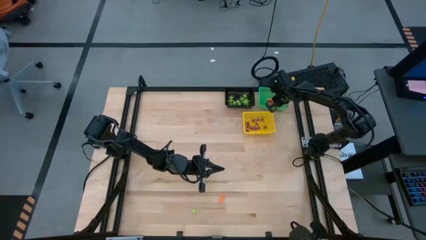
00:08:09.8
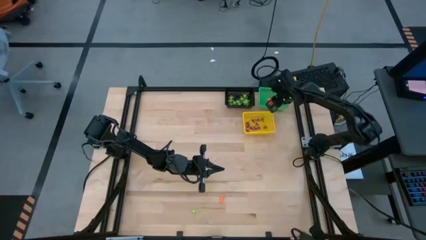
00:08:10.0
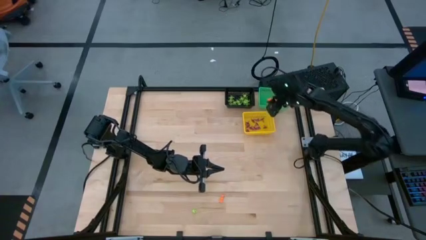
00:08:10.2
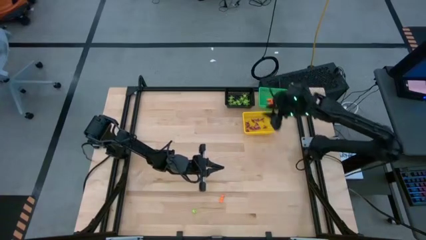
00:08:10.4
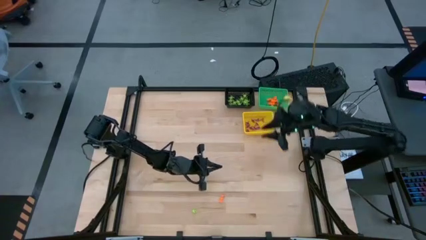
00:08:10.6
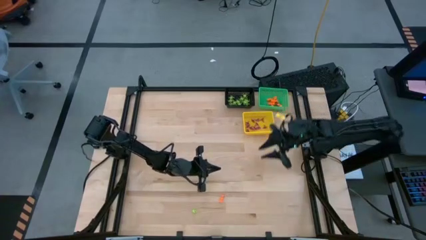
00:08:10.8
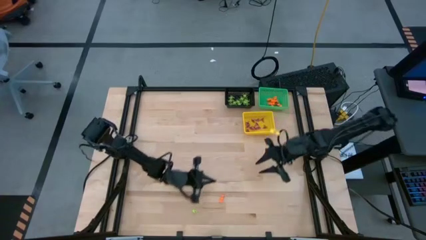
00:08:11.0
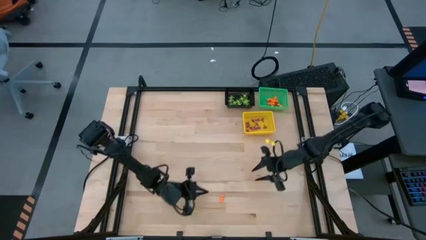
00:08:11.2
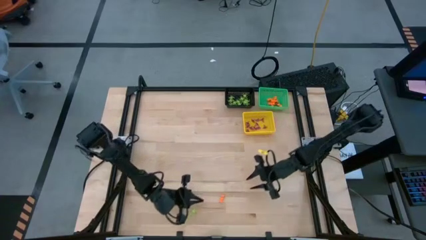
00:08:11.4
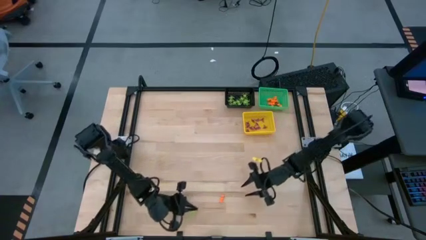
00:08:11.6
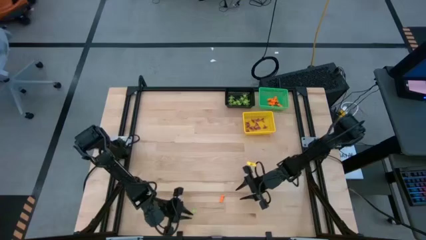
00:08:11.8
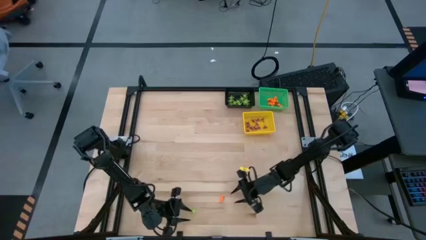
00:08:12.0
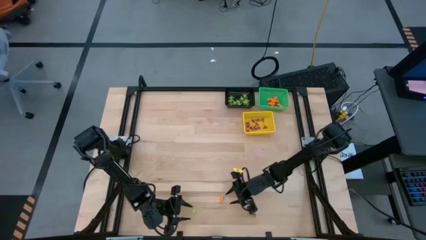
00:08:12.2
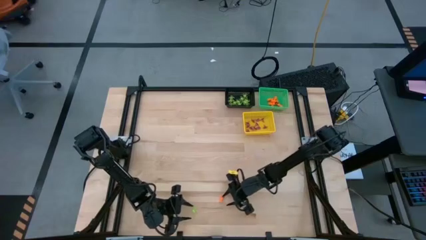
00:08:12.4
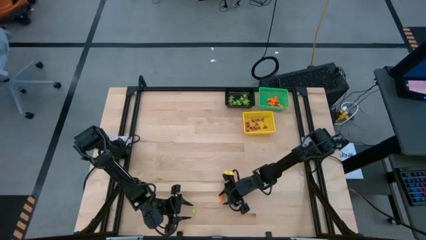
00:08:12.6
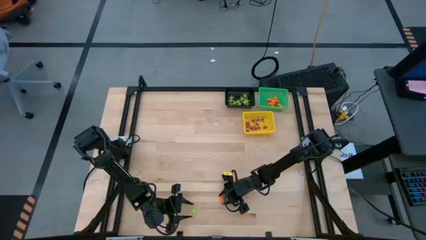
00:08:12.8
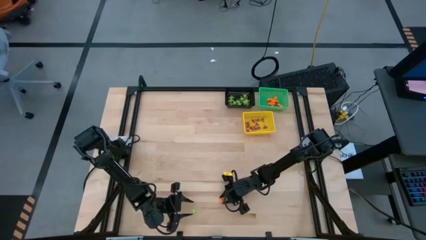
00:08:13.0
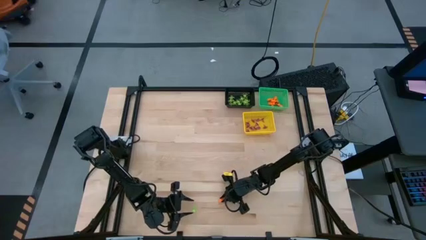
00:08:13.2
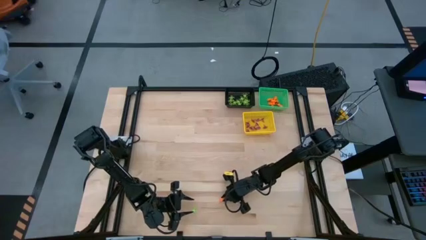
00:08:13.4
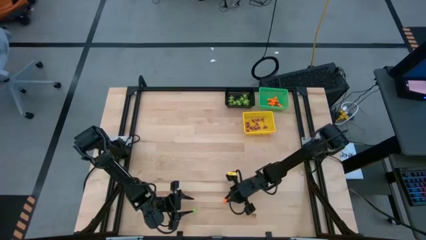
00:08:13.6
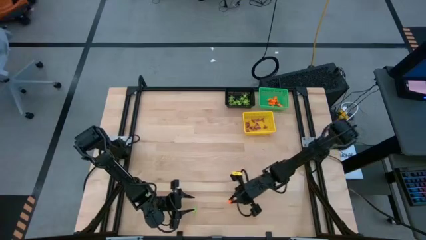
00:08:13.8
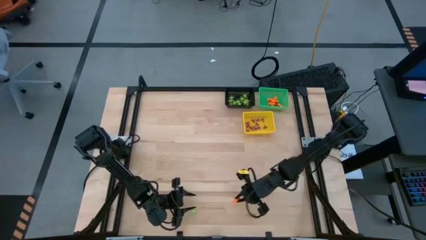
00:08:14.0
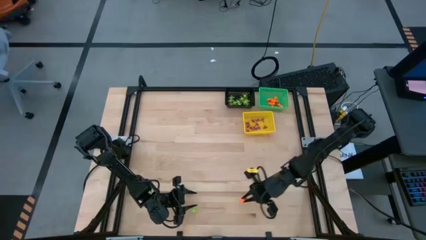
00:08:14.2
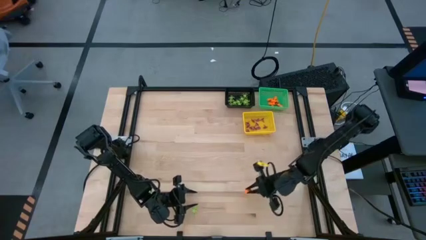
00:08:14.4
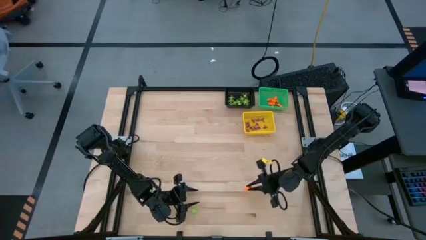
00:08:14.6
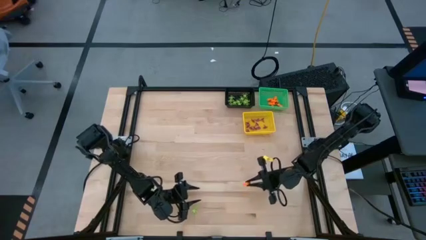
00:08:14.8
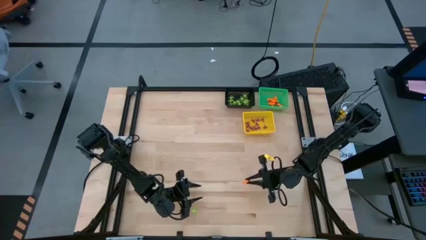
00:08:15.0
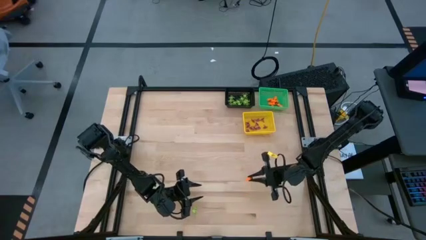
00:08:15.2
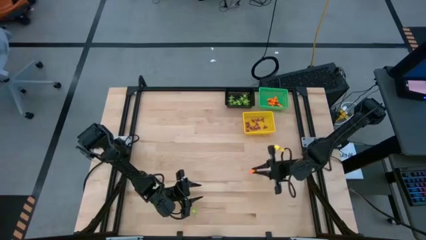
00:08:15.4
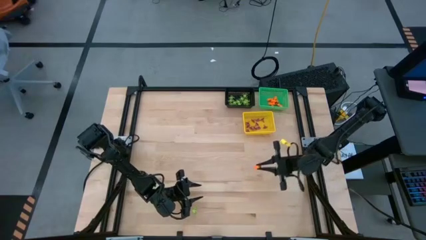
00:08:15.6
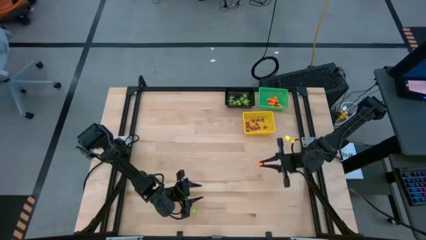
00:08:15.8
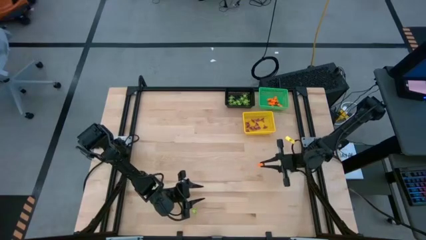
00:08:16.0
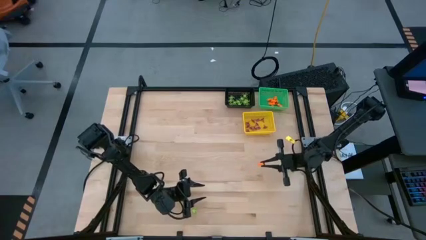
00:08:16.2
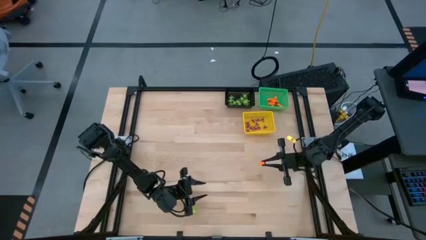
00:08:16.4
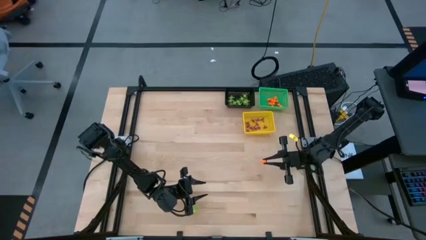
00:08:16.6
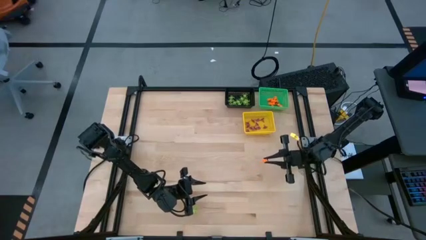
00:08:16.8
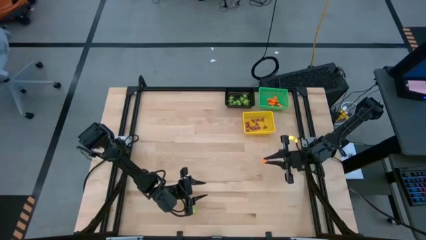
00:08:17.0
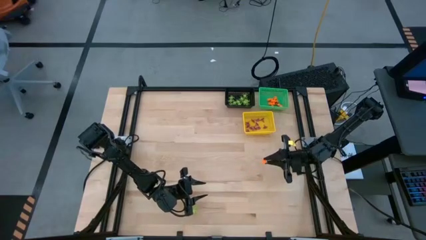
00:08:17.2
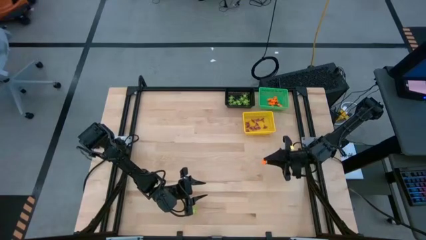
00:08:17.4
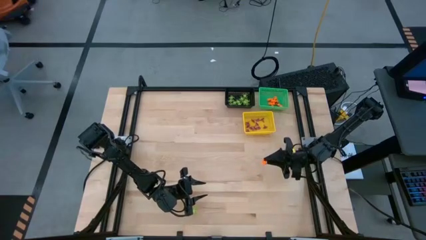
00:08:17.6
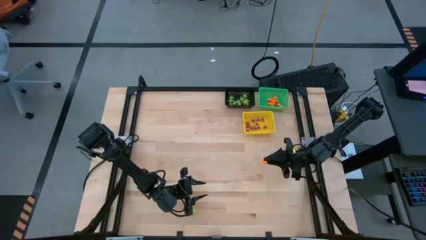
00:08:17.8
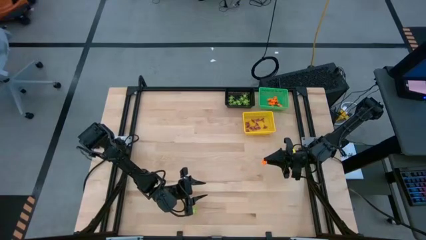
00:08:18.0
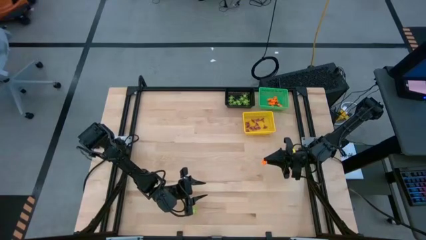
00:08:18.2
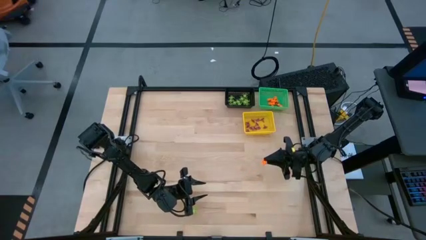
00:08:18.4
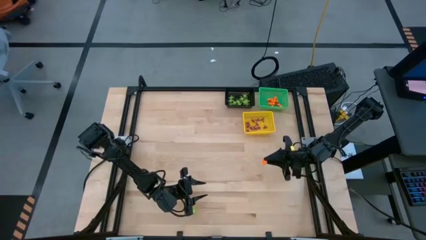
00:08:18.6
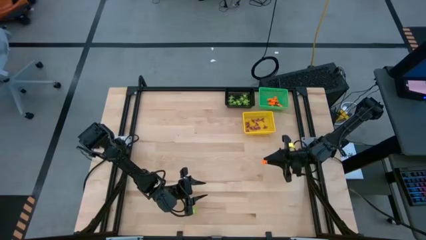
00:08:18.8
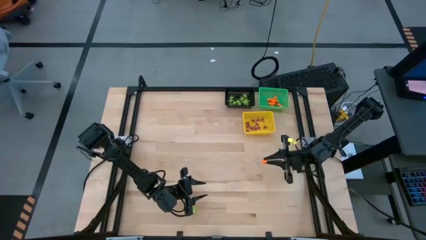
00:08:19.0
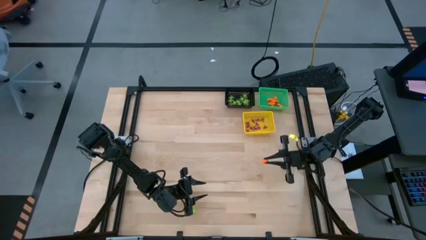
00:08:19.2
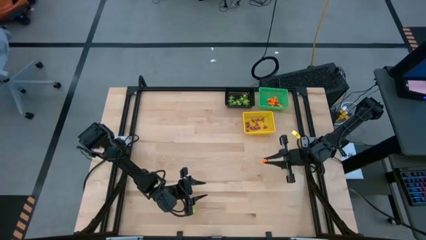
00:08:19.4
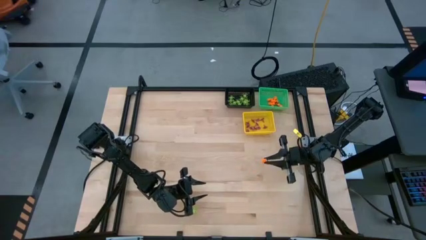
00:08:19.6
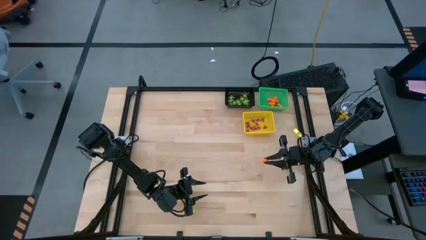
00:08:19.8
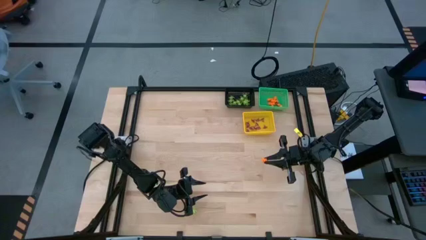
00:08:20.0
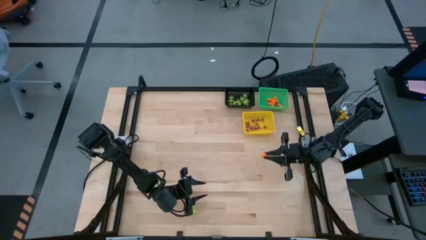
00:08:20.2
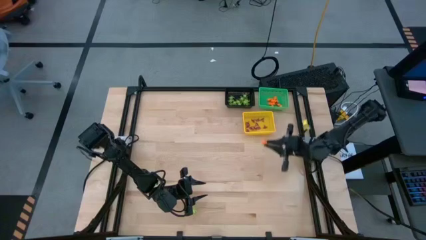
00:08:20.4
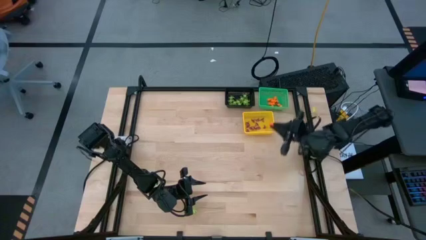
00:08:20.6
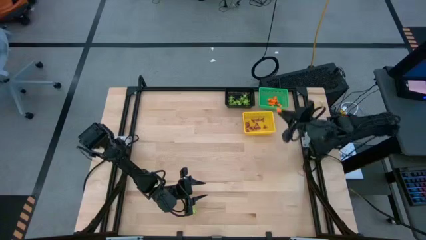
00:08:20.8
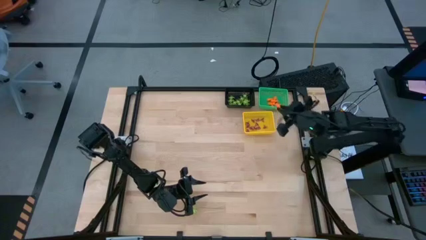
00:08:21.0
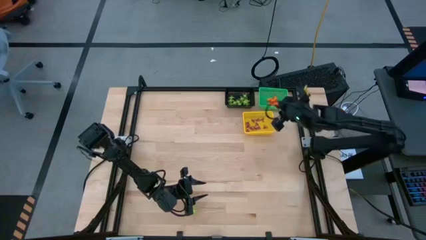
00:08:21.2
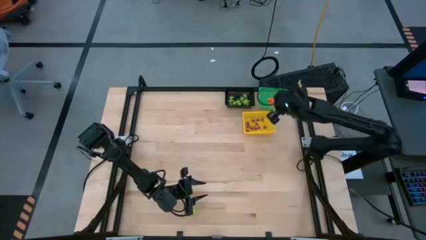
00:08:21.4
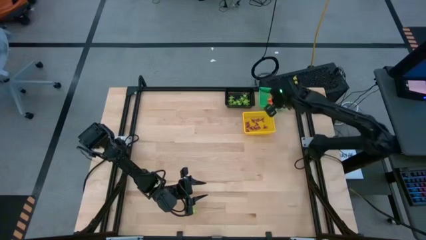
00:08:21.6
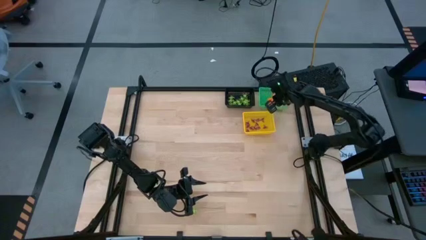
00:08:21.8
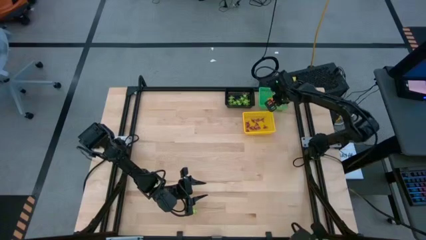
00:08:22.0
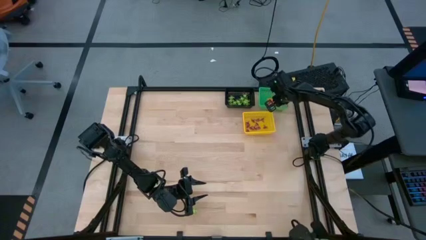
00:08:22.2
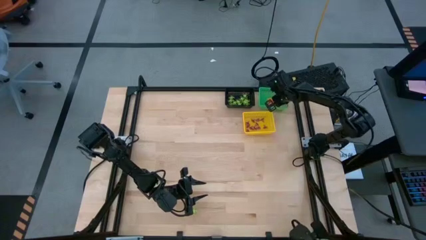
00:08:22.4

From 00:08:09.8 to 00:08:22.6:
Task: Sort Halloween decoration
Put the orange skeleton toy into the green basket

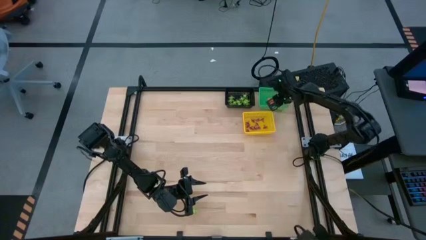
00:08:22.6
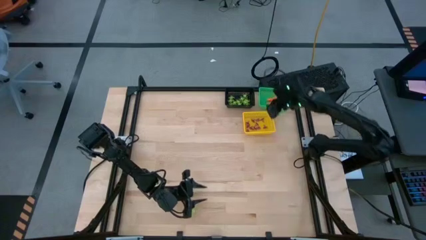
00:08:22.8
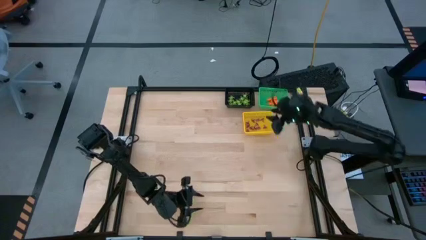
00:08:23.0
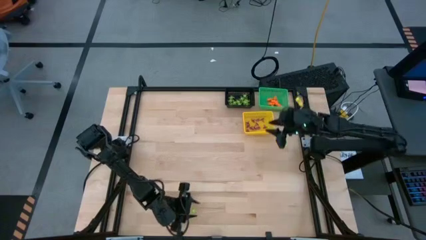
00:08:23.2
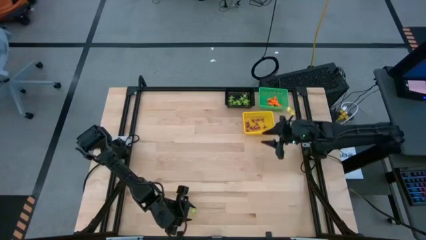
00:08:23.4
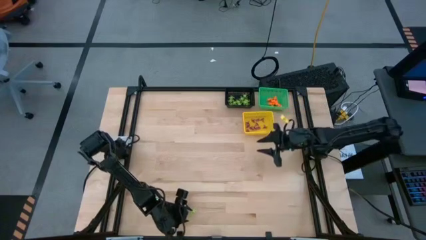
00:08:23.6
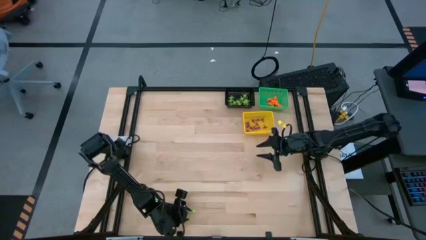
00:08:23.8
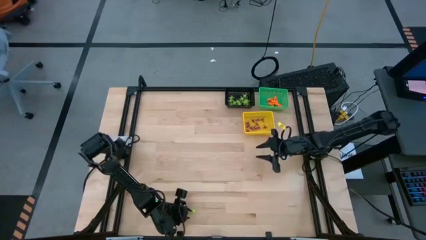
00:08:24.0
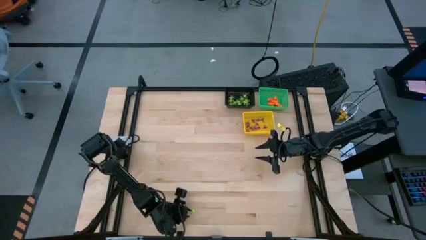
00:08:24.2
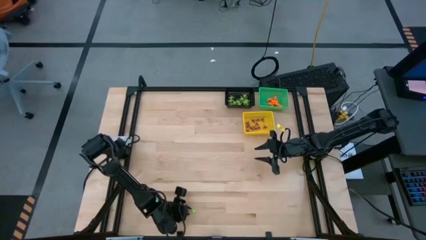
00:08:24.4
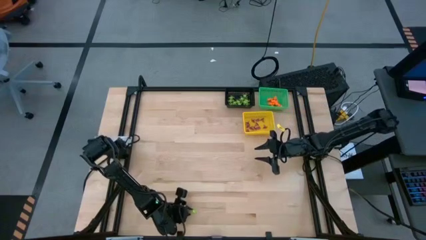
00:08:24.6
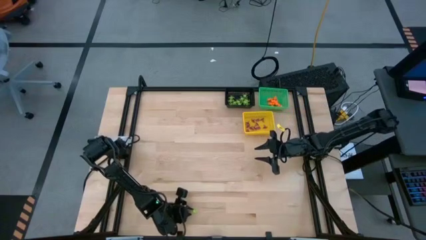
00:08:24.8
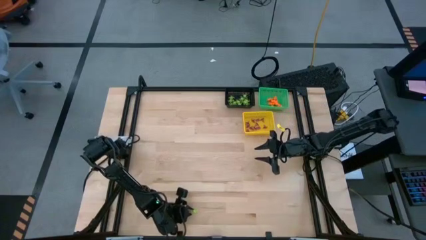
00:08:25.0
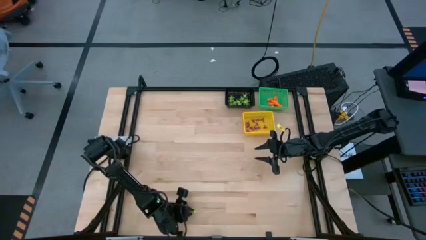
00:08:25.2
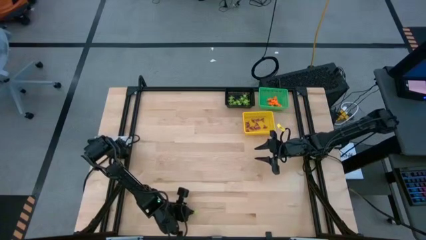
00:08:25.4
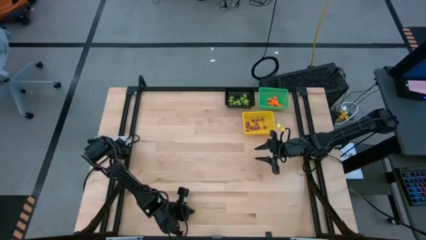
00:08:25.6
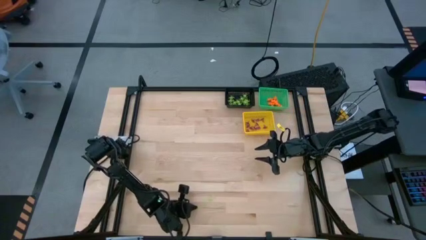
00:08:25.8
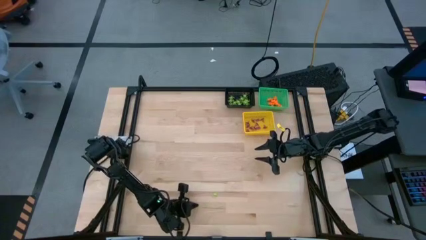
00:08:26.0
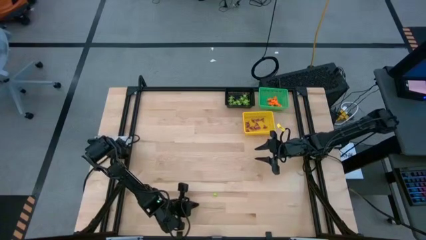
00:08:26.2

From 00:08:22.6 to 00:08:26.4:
Put the green spider toy into the black basket

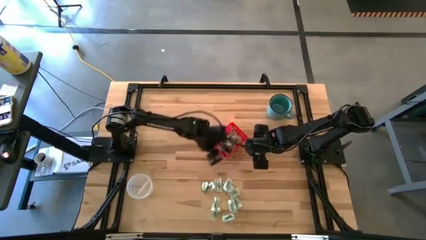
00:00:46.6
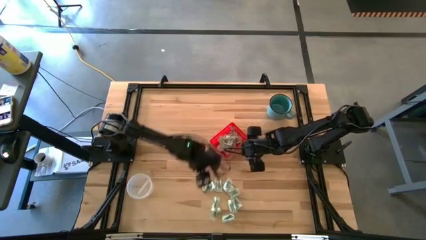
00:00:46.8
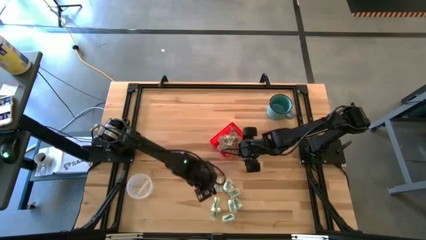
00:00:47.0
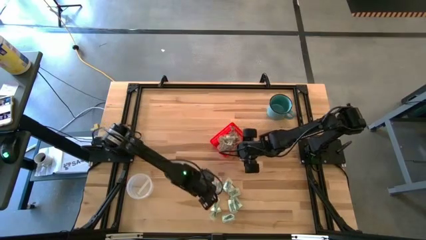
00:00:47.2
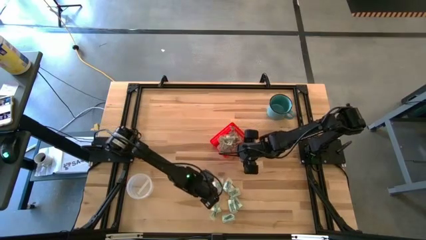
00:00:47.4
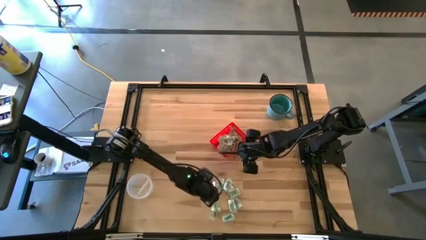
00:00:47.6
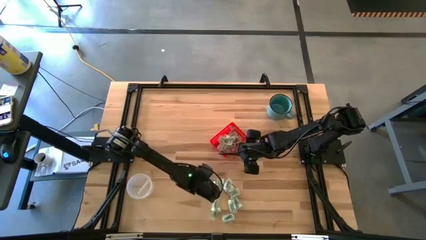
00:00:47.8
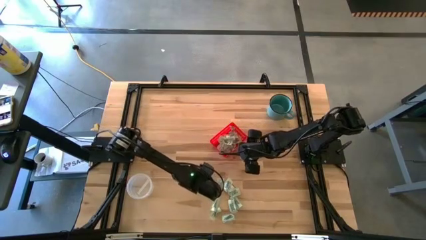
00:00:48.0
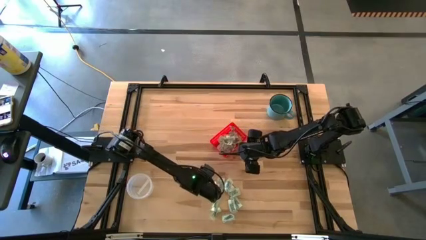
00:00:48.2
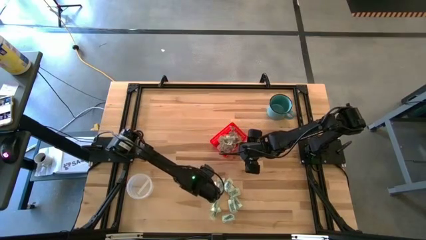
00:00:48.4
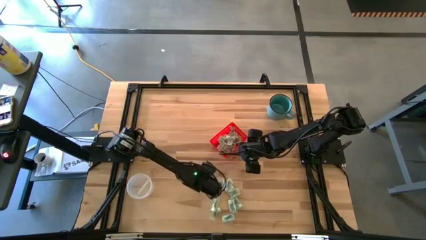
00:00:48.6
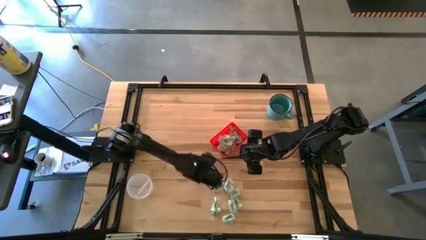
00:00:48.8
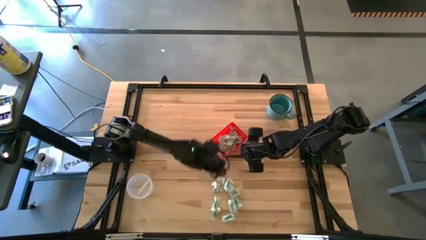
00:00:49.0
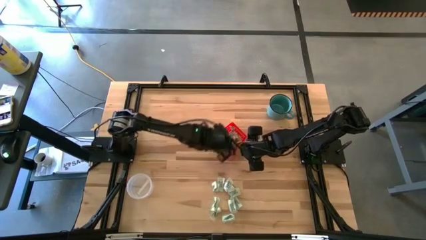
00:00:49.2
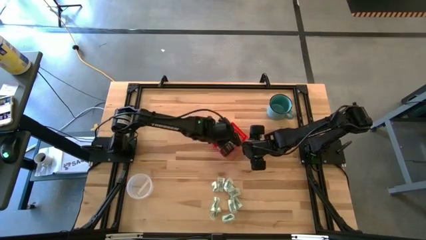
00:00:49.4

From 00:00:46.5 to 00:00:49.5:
Task: Pick and place items into bin
Put the truvia packet into the red bin
